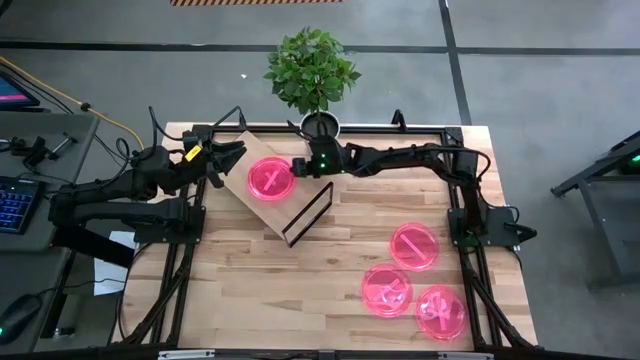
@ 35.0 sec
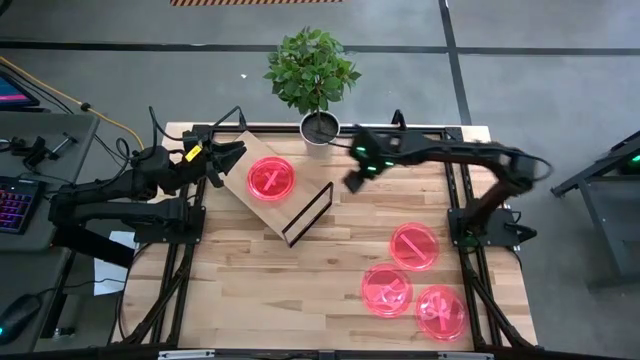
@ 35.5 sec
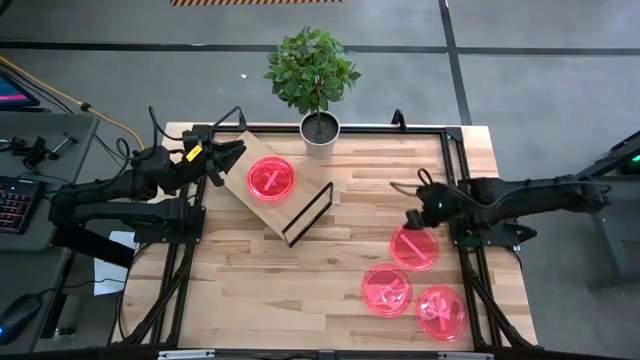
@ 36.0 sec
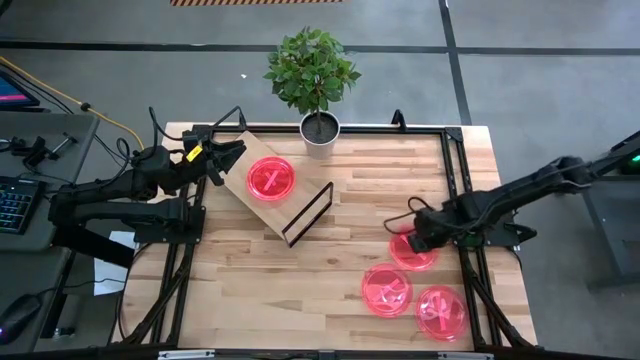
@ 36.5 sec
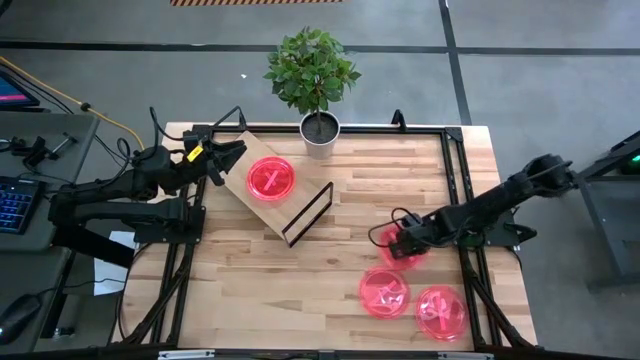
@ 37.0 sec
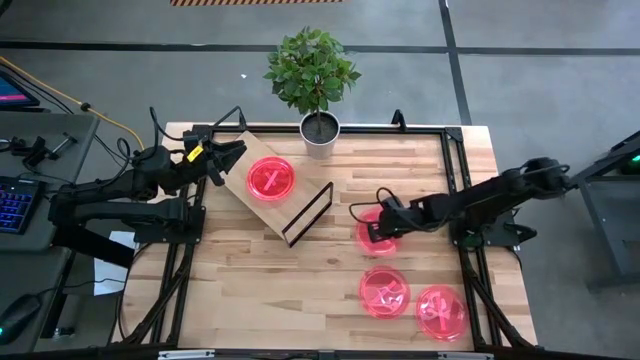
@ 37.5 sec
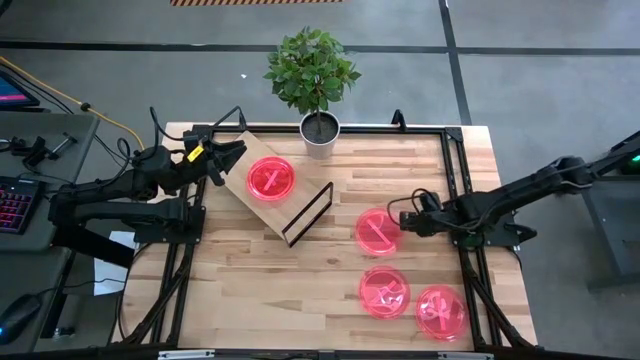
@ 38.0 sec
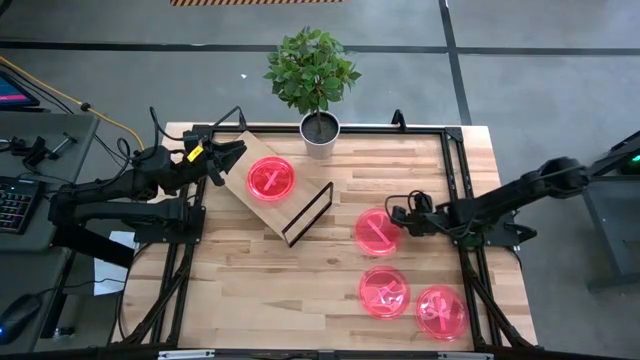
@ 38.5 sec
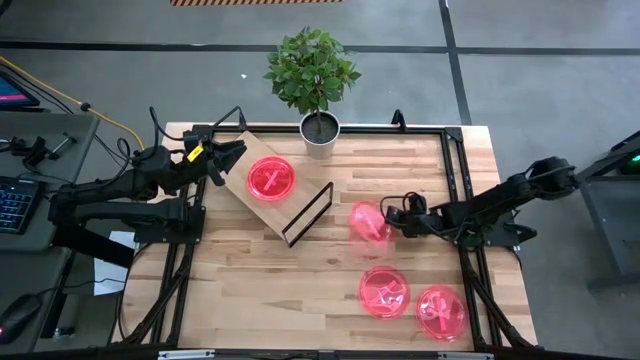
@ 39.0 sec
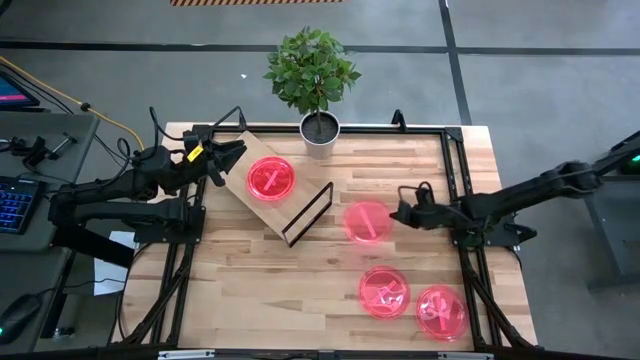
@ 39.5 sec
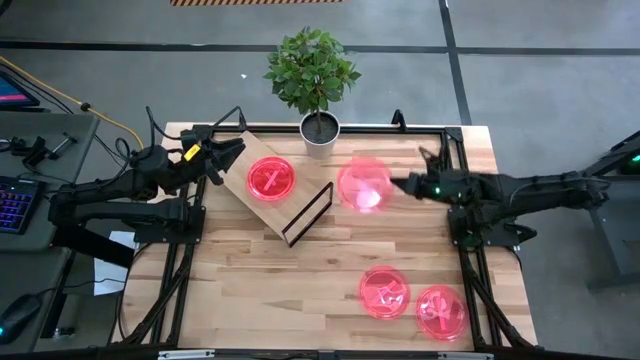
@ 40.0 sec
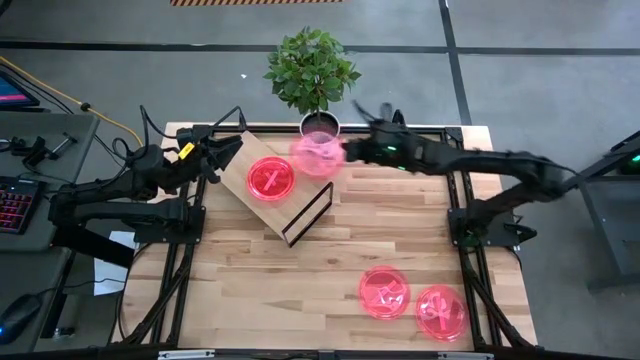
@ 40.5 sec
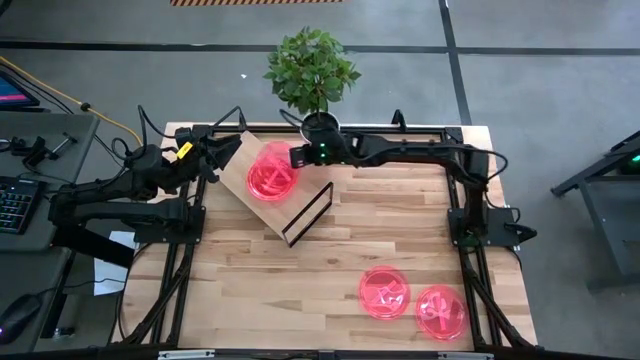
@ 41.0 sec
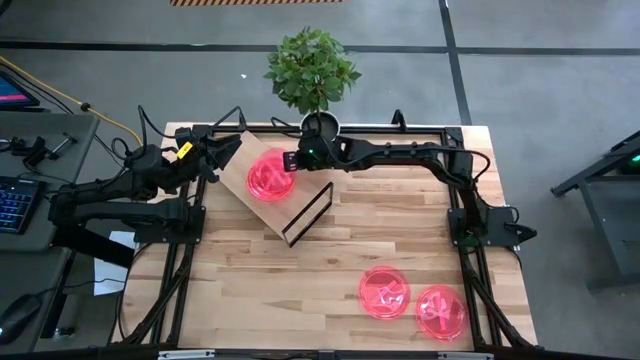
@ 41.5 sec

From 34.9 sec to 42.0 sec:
Task: Place and stack plates onto a shelf
Stack the pink plate on top of the pink plate on the shelf

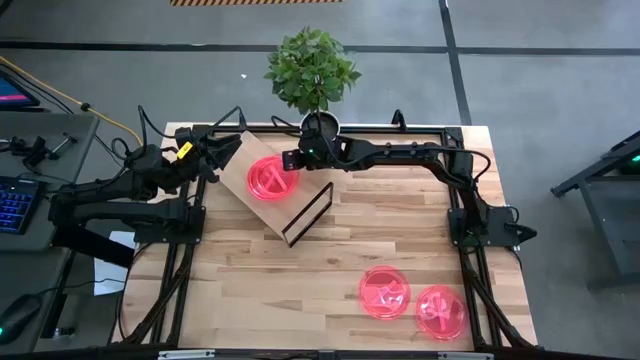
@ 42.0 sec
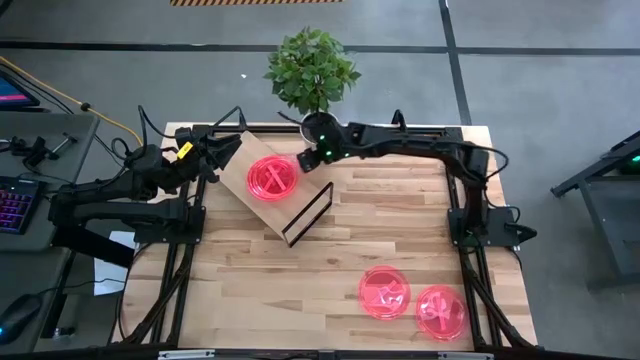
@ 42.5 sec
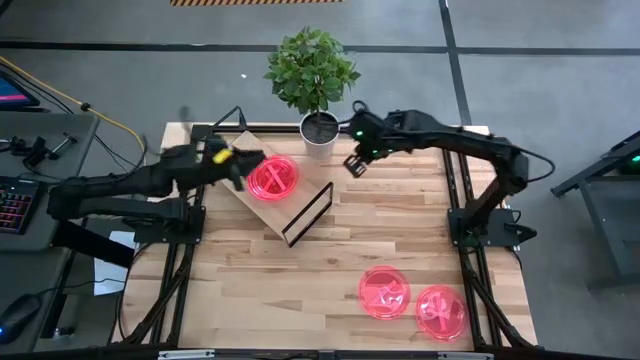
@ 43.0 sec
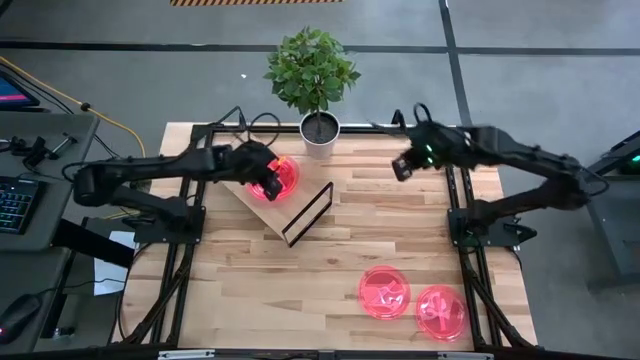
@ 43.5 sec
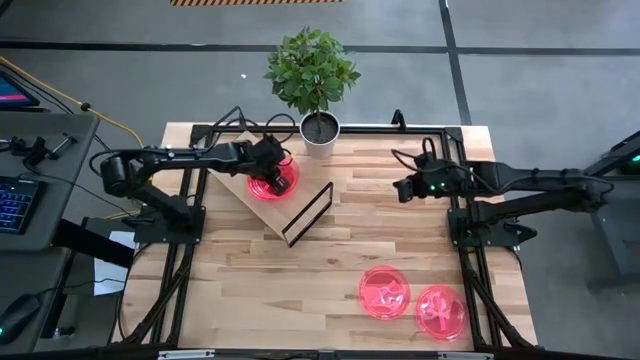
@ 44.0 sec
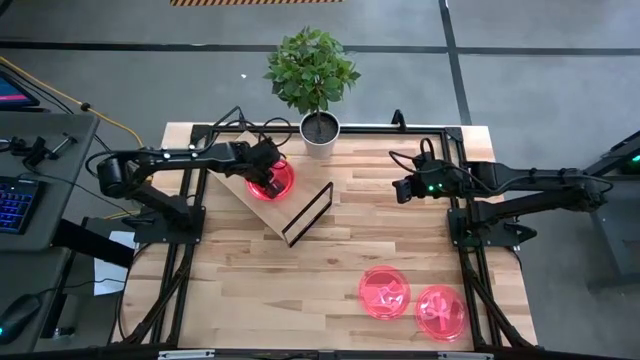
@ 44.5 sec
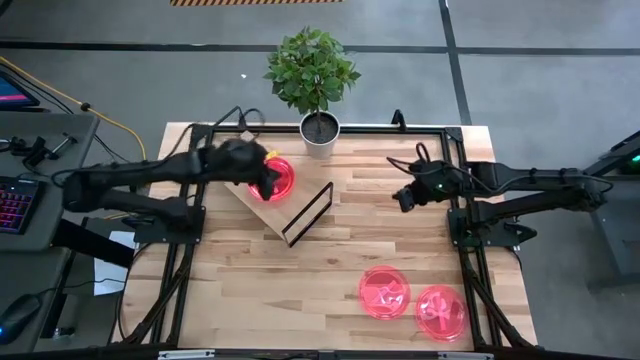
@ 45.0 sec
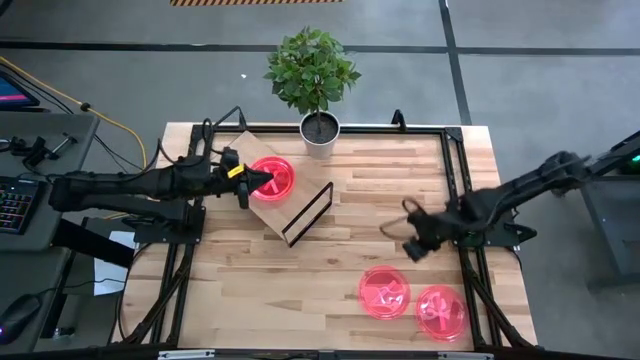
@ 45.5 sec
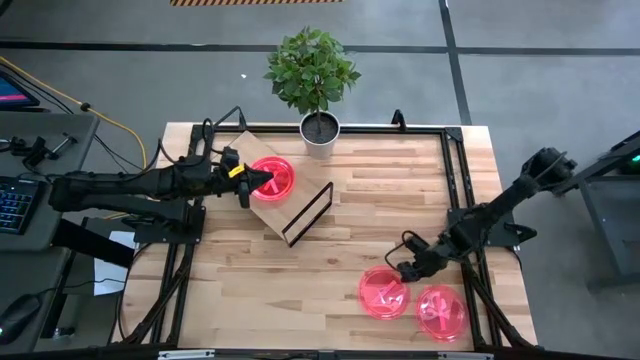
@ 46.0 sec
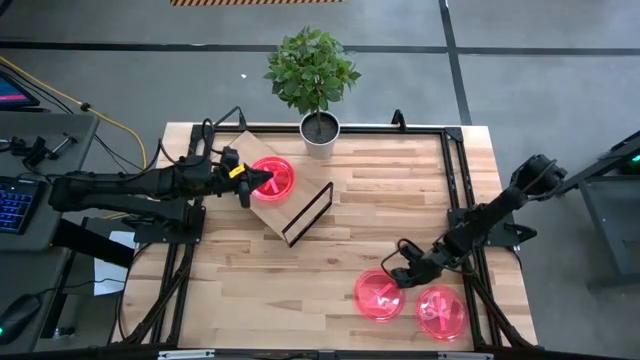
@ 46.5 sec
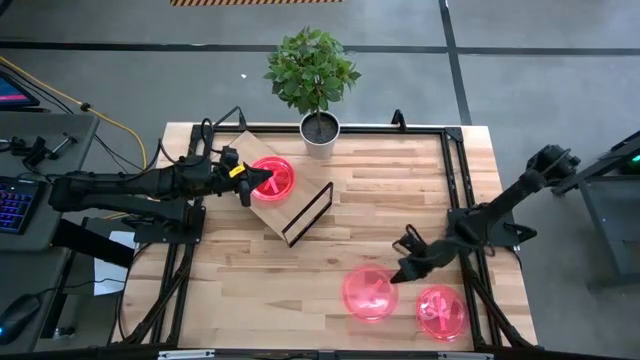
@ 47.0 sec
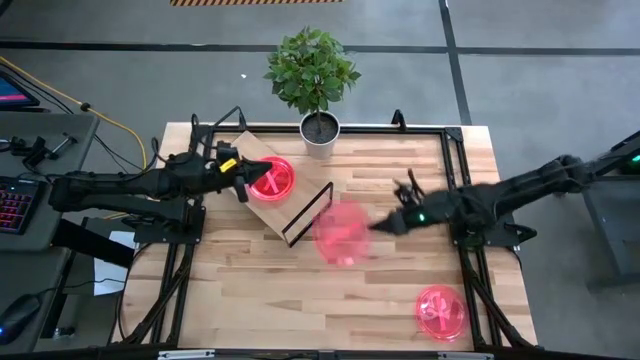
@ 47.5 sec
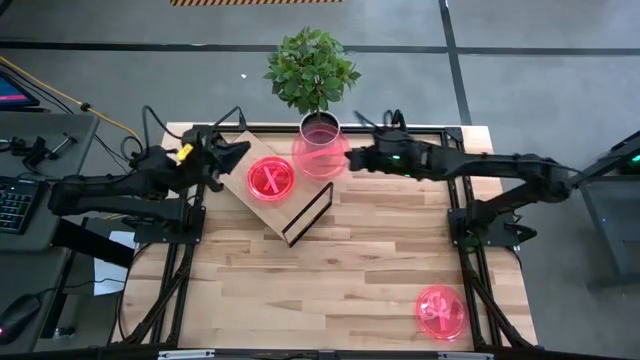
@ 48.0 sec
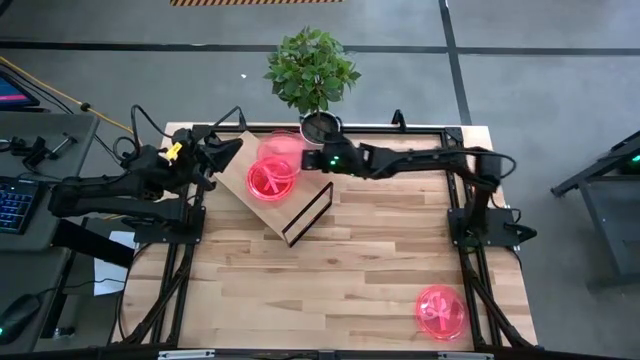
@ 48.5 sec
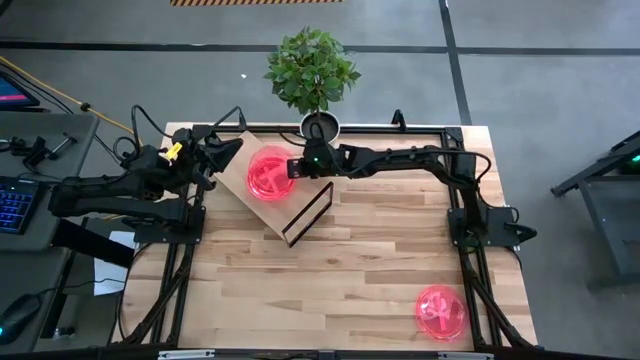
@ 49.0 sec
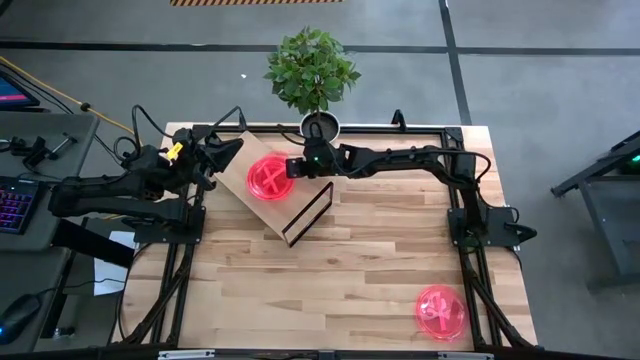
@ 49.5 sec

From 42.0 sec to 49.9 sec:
Stack the pink plate on top of the pink plate on the shelf

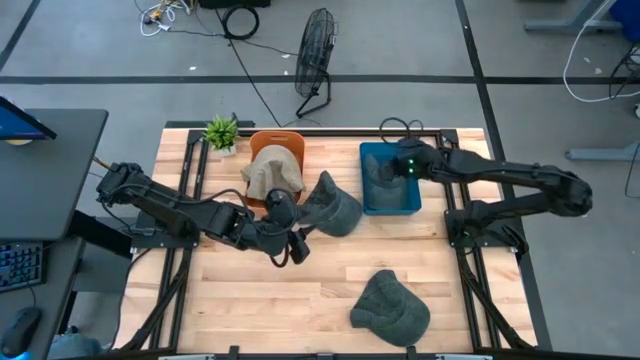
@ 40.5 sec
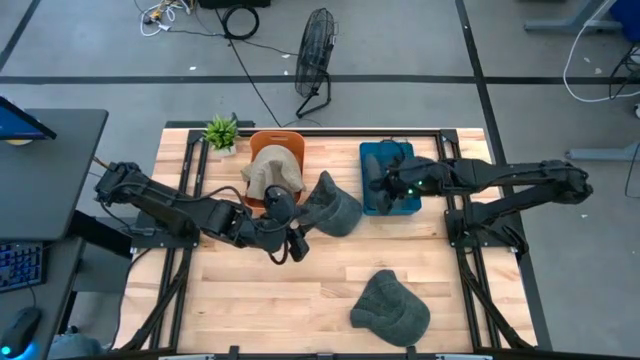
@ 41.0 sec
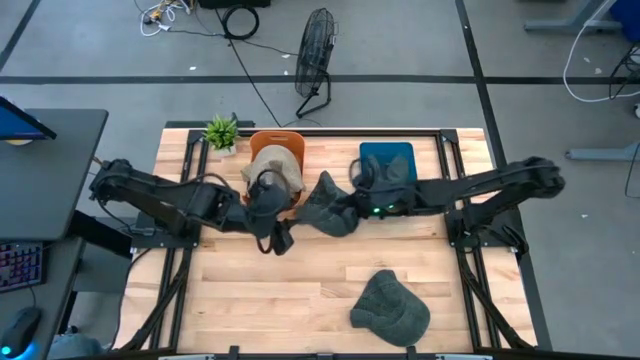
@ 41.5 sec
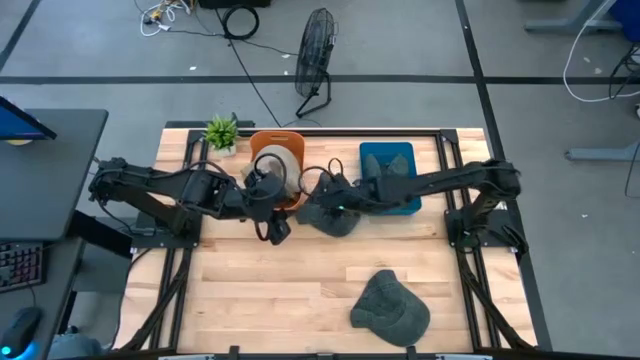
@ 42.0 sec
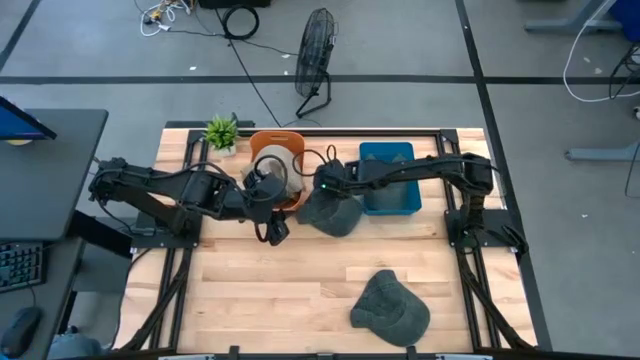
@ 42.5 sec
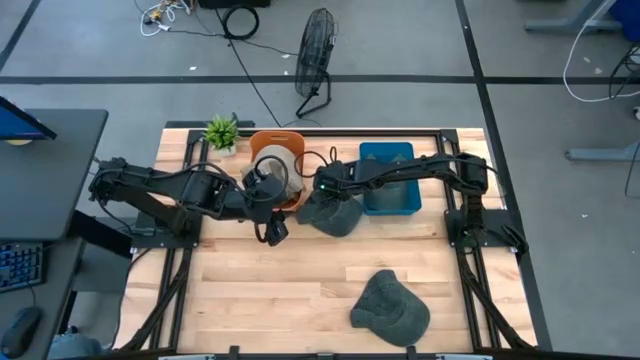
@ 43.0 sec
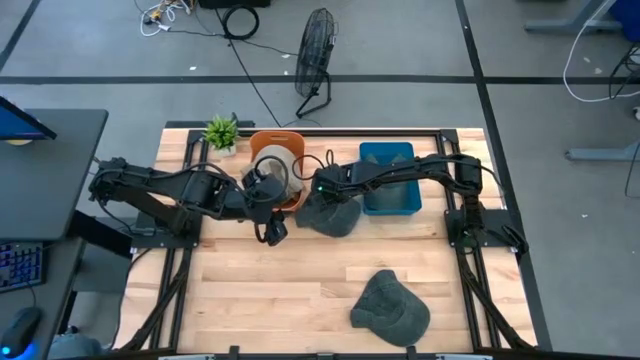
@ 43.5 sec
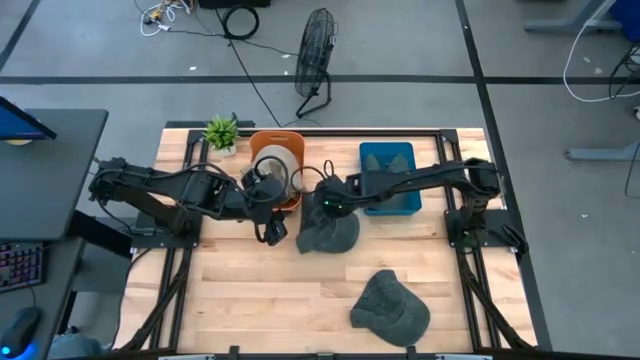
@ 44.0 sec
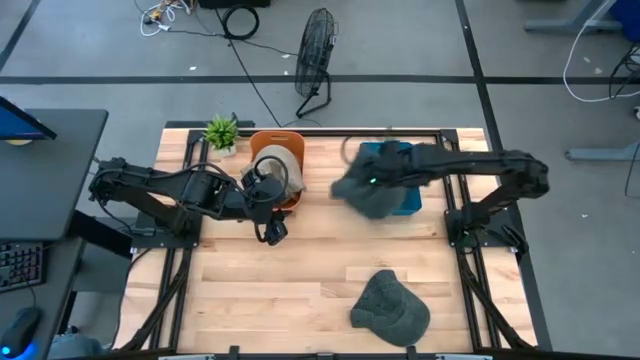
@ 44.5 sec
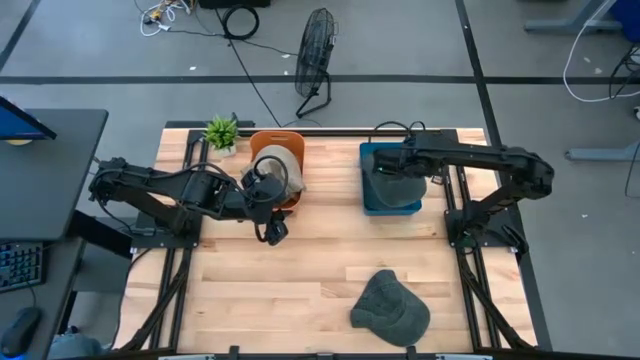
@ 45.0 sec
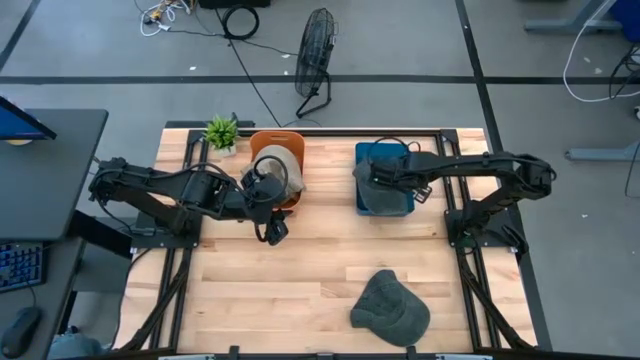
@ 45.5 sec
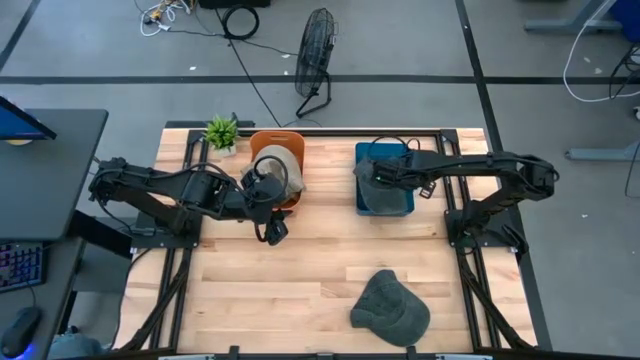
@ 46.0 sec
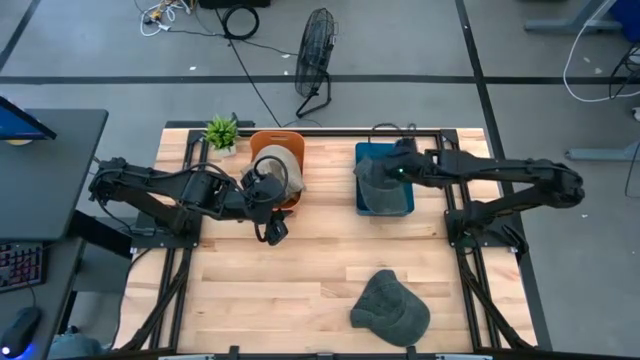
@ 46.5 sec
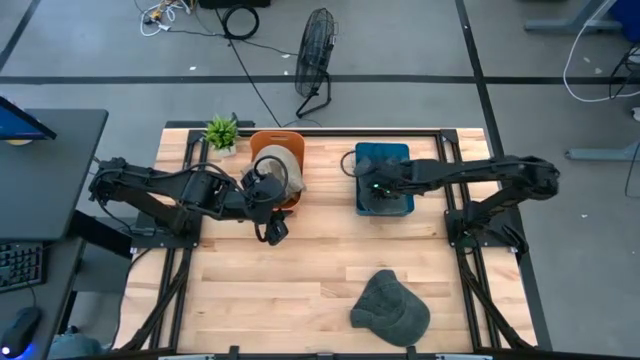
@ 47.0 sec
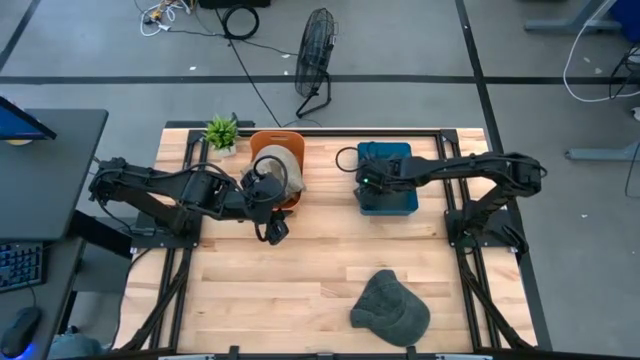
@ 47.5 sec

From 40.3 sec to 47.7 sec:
Task: Pick & Place hat
Put the top black cap into the blue bin
